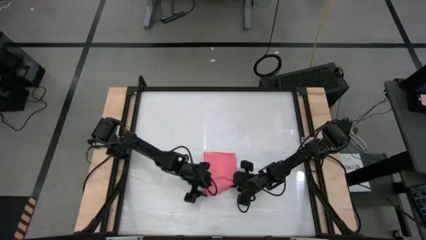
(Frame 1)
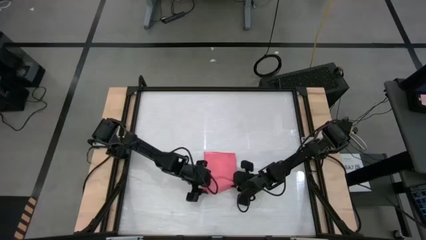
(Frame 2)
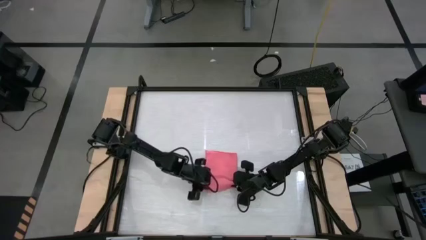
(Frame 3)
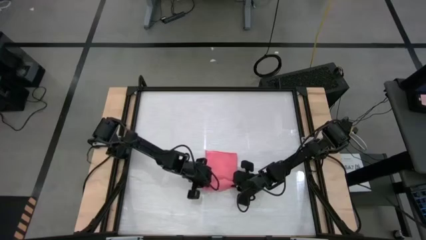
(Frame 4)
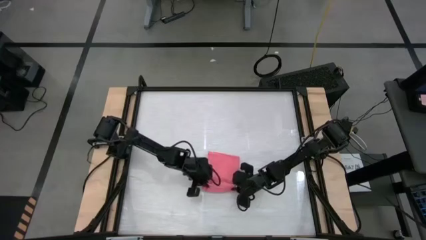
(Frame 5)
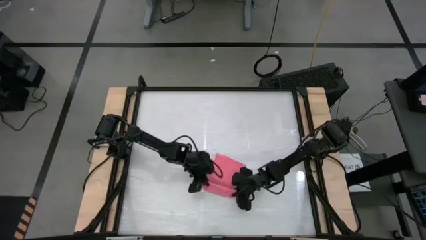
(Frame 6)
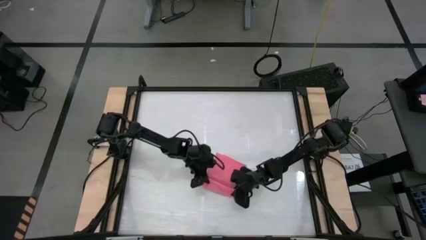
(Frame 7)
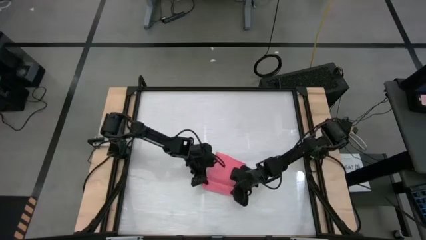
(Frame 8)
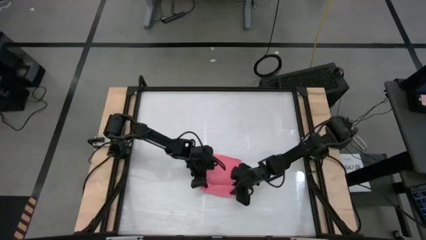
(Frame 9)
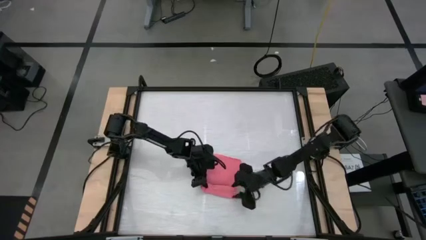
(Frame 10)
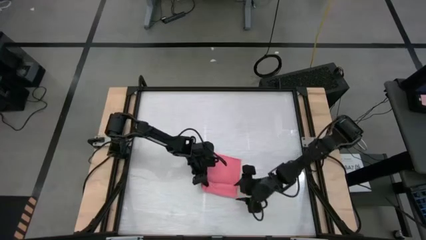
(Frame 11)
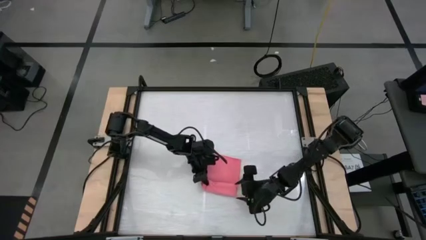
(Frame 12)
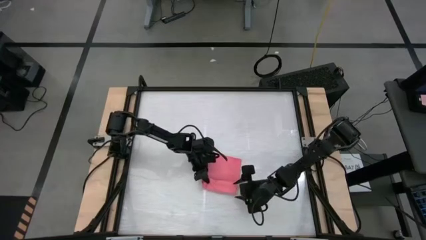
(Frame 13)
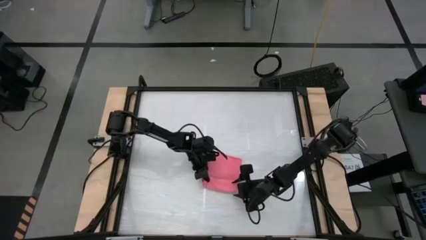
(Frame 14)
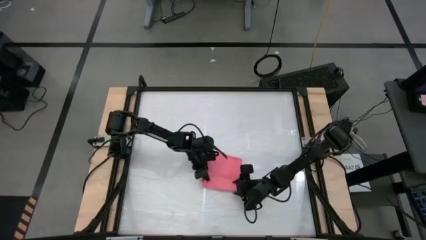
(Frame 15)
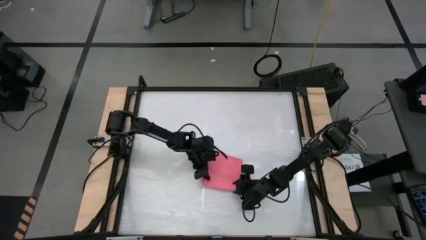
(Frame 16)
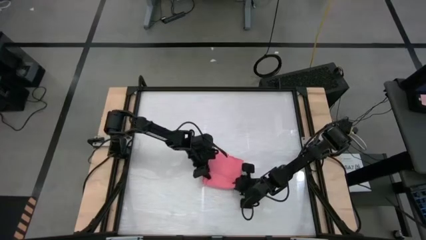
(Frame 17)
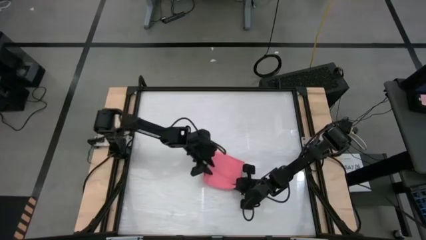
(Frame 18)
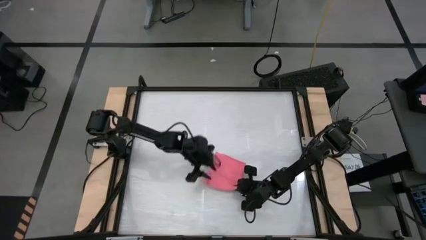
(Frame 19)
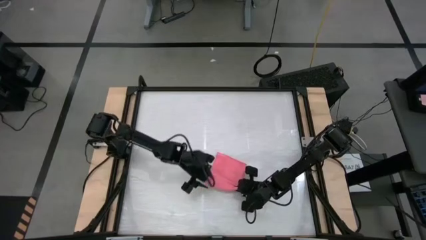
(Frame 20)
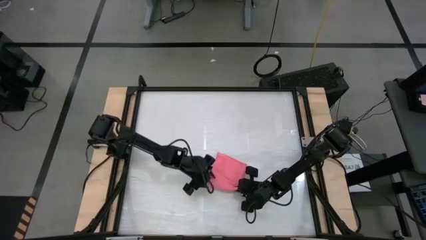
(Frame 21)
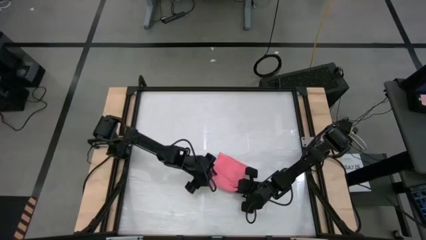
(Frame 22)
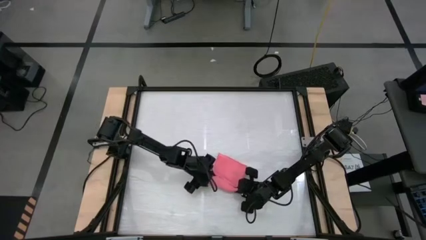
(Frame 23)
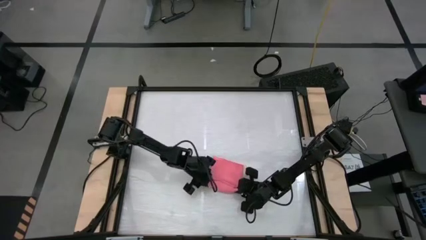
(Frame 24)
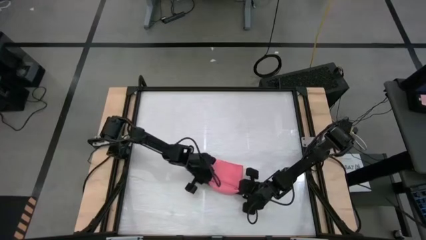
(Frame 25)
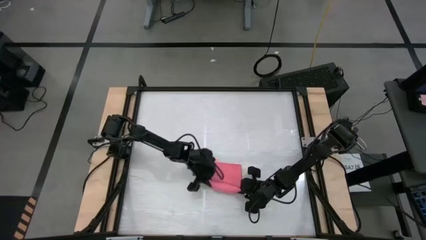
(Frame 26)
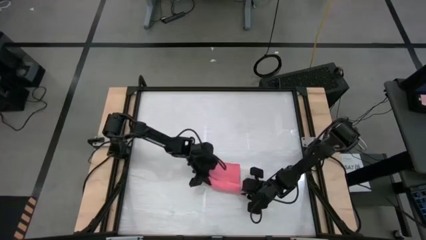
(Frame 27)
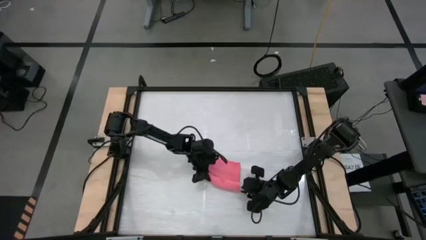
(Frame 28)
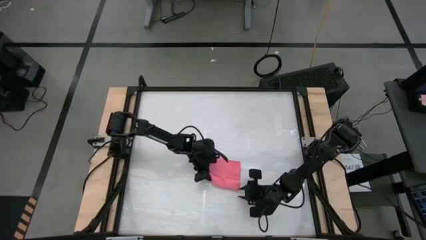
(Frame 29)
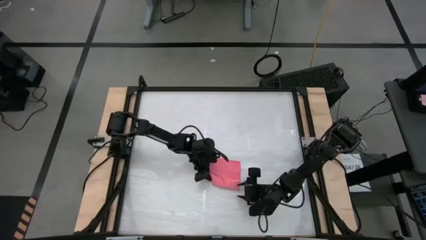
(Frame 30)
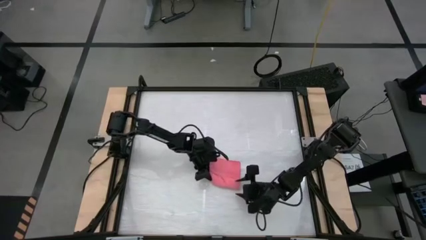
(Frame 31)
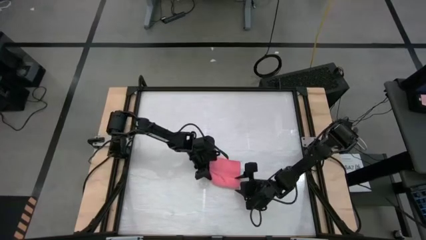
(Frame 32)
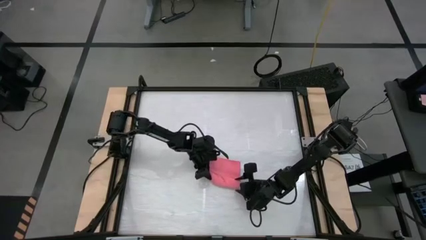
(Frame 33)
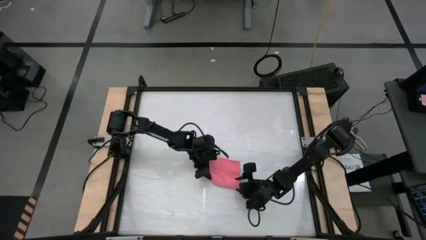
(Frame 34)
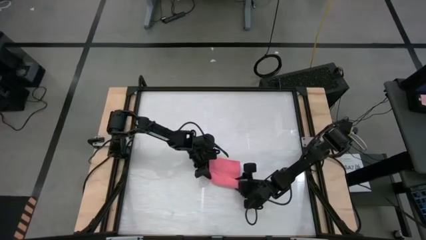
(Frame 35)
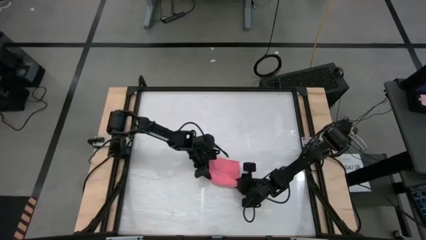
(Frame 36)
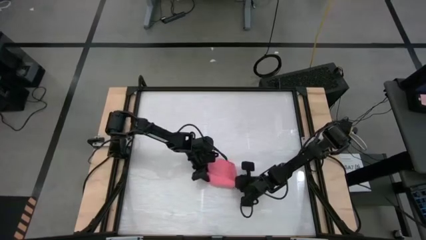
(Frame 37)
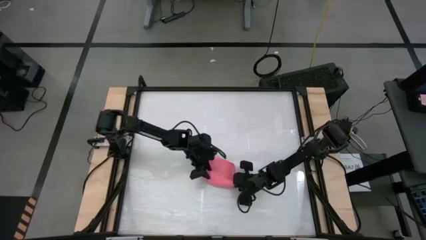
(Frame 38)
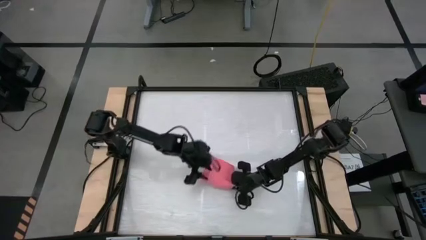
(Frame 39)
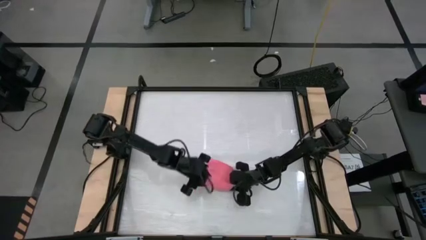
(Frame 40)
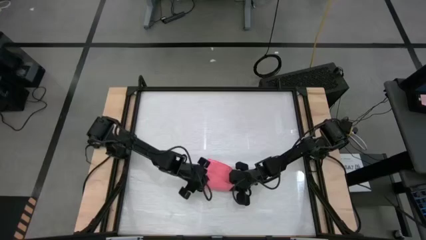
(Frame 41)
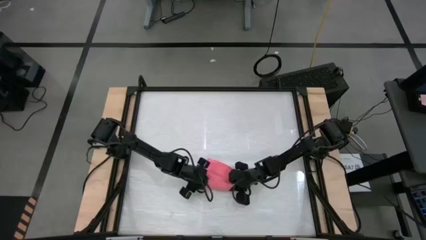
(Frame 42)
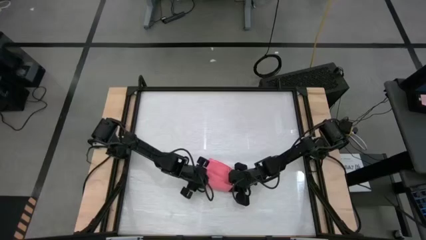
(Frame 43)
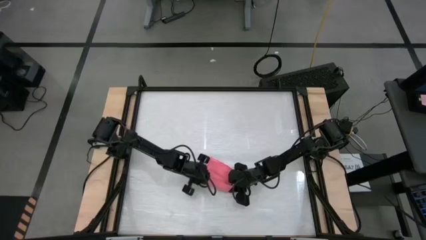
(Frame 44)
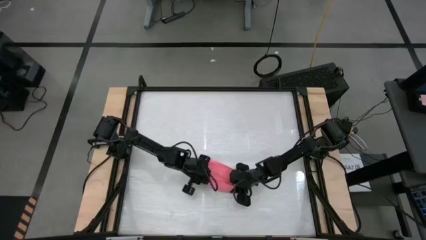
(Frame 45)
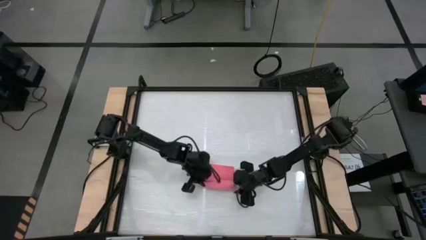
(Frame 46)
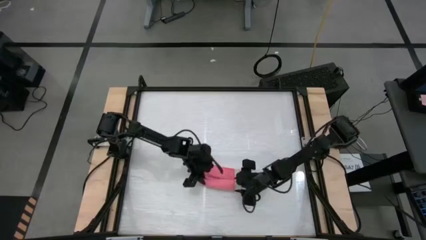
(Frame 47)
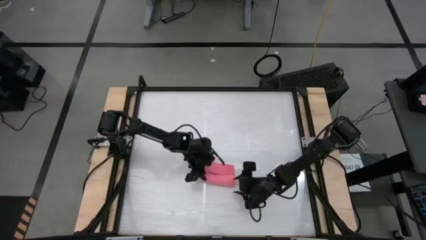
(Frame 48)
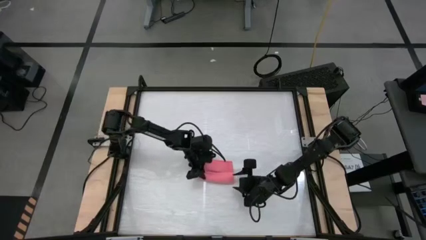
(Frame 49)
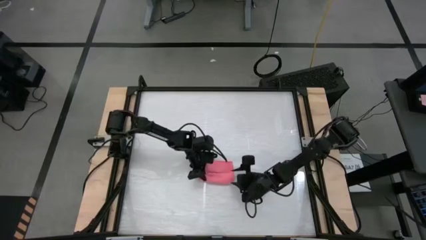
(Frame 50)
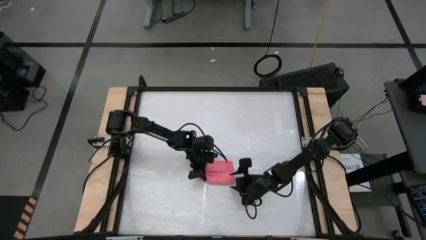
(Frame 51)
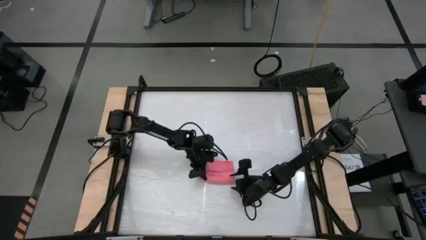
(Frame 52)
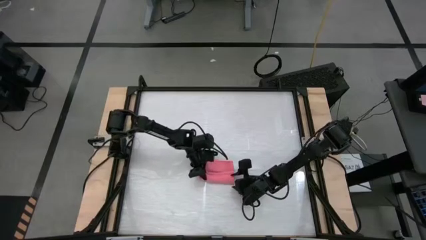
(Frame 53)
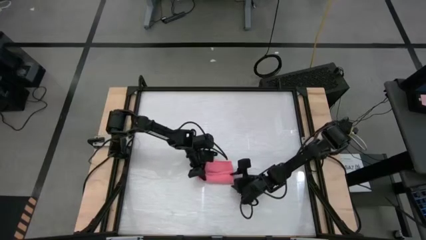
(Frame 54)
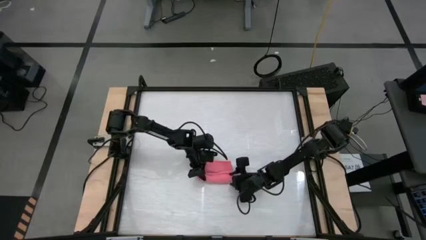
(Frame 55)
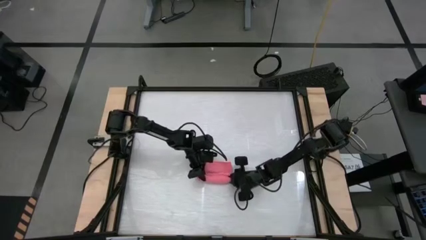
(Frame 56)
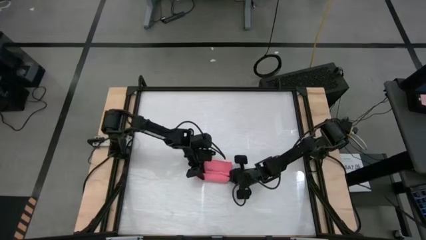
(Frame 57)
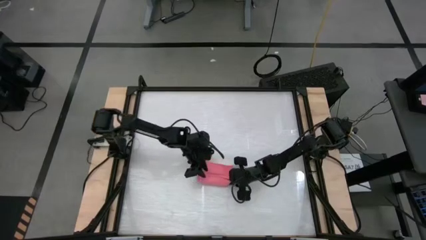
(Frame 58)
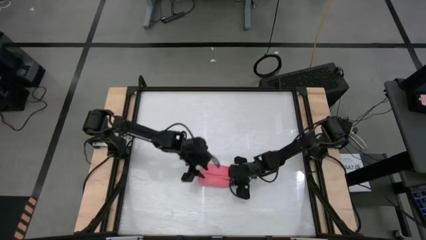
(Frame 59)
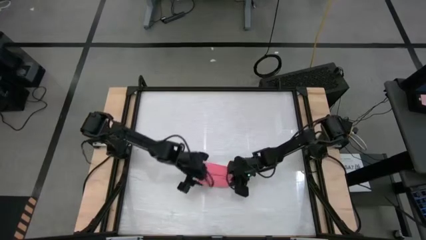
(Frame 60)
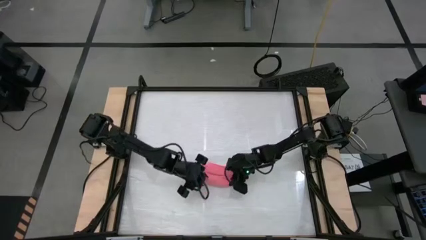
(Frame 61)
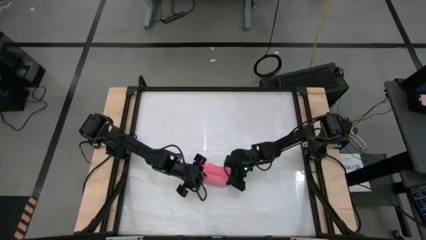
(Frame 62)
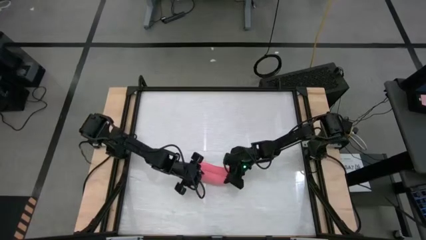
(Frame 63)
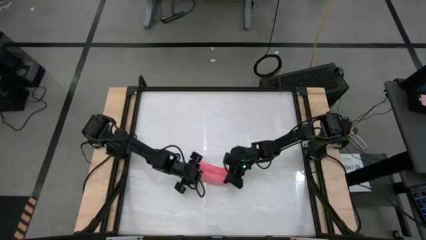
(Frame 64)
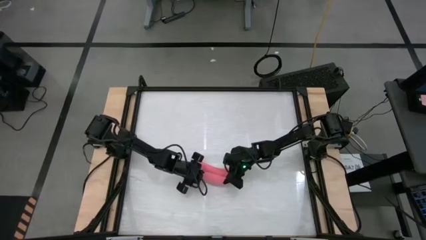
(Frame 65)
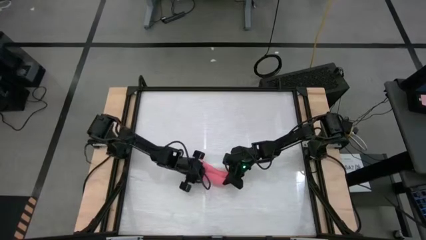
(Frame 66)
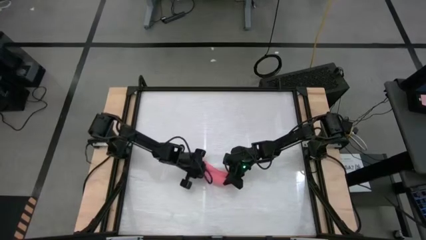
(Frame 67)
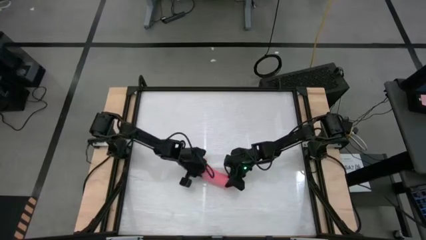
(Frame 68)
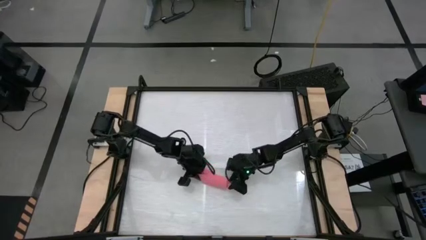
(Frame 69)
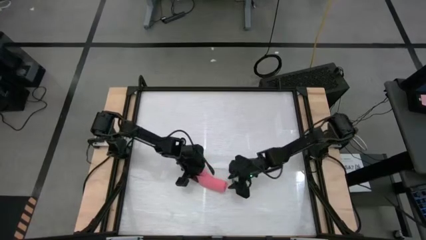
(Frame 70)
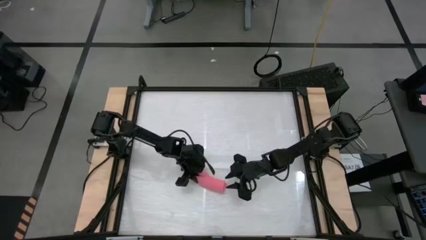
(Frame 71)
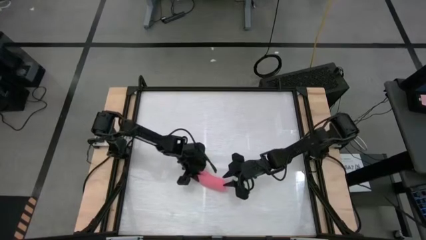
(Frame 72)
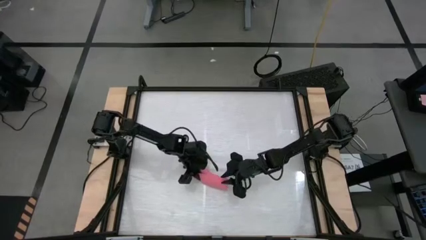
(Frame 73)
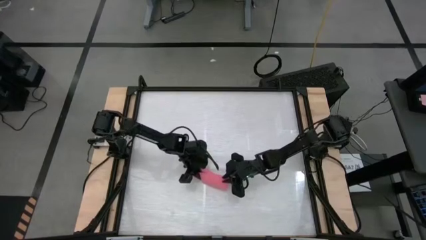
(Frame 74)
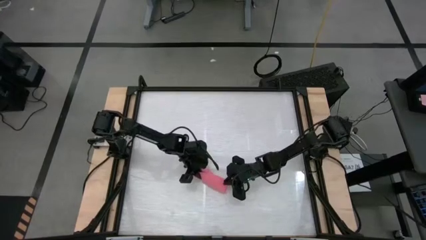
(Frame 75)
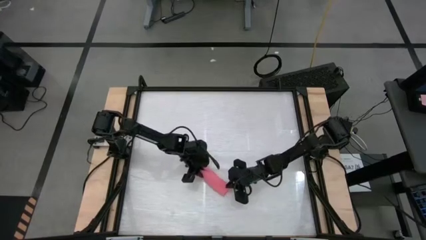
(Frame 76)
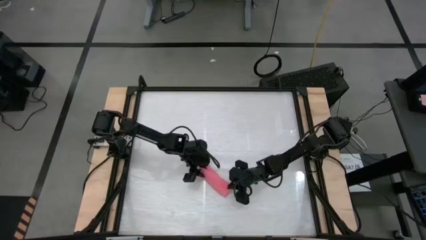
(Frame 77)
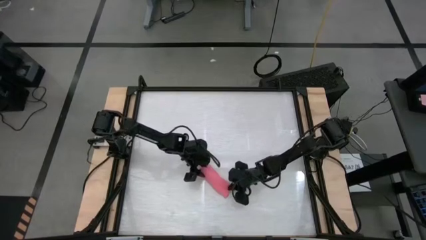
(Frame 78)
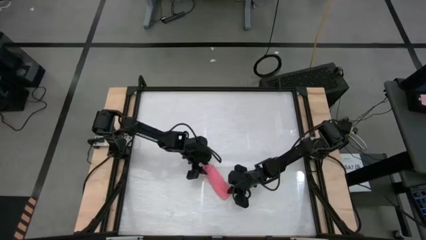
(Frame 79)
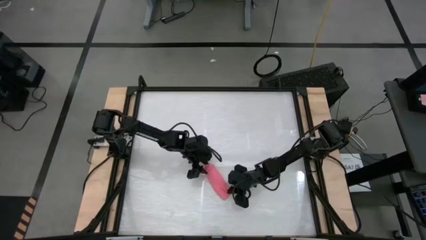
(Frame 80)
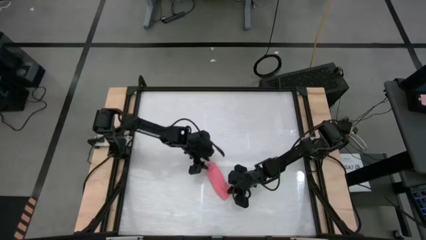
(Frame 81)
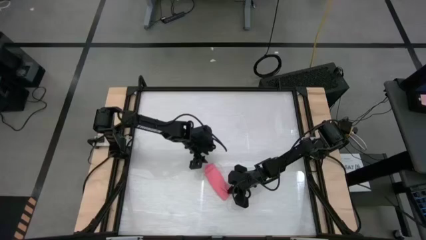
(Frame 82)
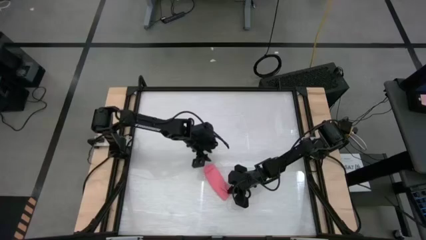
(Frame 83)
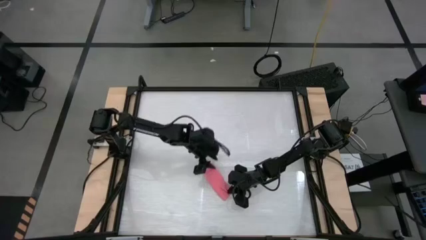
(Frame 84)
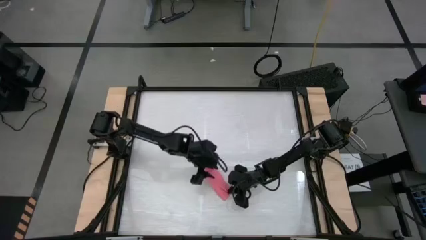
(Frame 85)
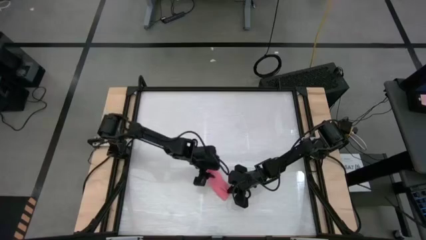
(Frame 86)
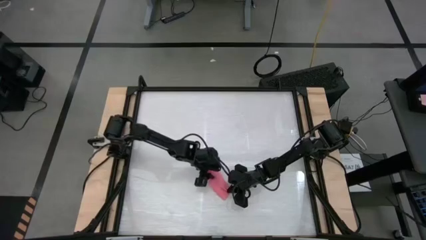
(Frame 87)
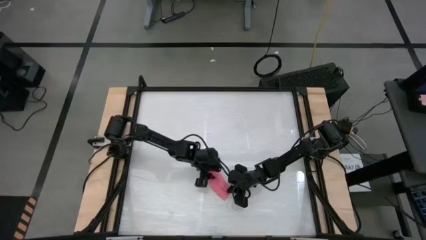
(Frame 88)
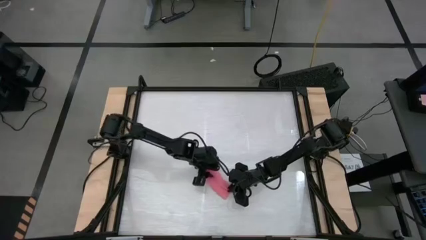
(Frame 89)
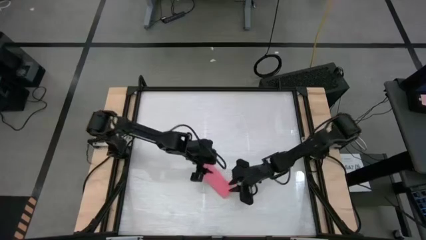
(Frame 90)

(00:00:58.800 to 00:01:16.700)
Task: Roll towel
Roll the pink microfiber cloth
